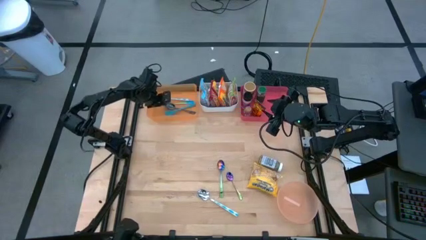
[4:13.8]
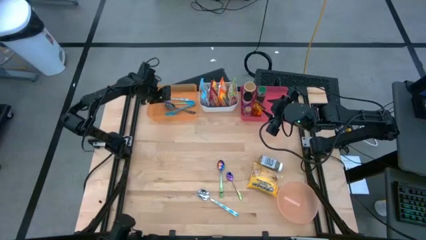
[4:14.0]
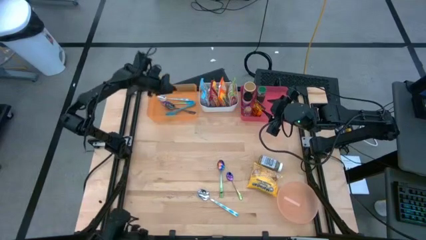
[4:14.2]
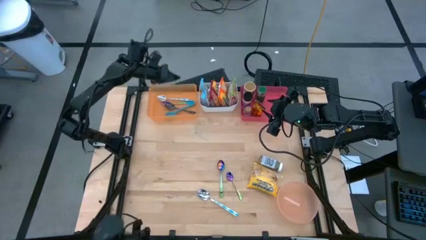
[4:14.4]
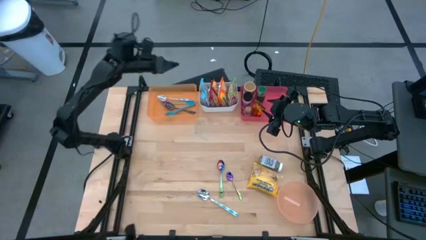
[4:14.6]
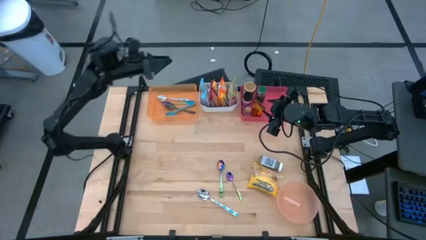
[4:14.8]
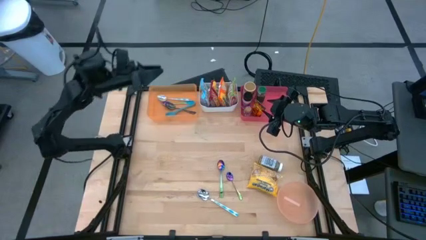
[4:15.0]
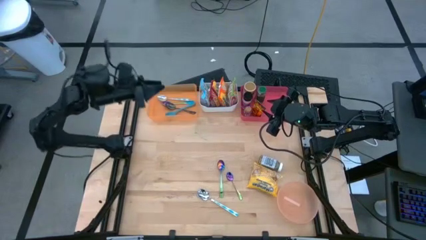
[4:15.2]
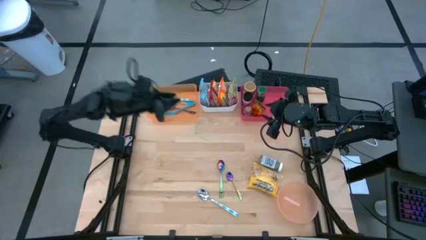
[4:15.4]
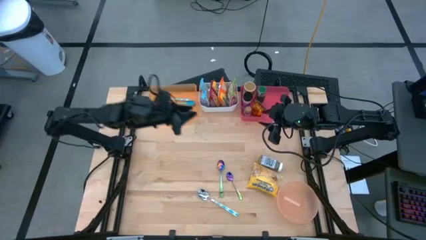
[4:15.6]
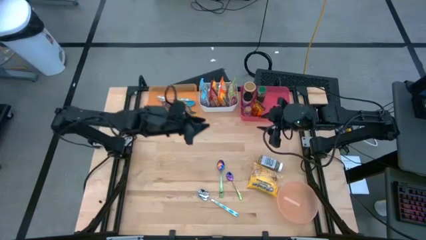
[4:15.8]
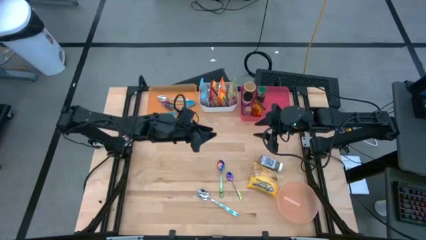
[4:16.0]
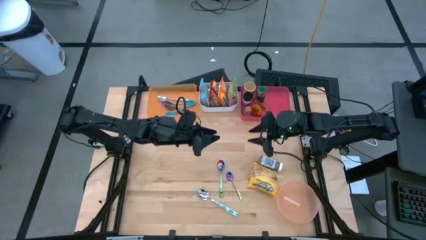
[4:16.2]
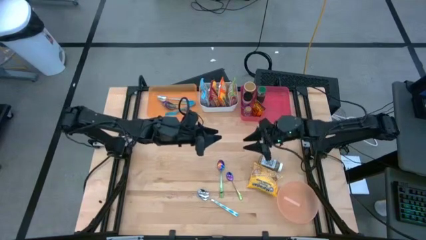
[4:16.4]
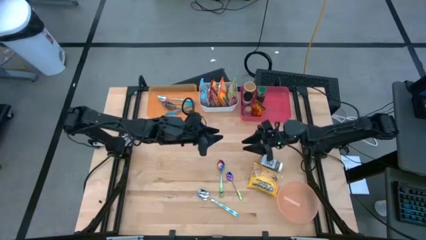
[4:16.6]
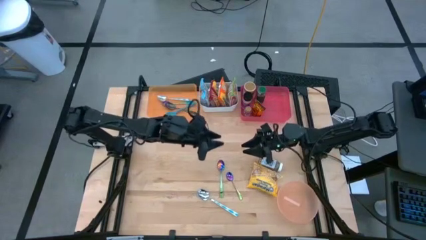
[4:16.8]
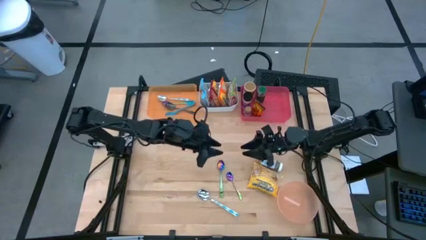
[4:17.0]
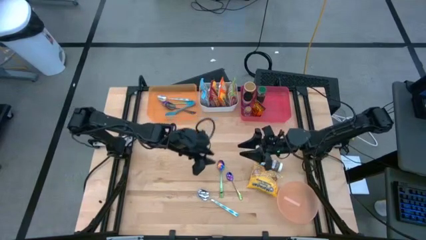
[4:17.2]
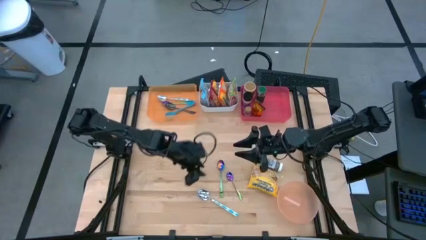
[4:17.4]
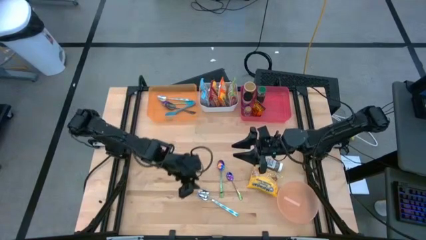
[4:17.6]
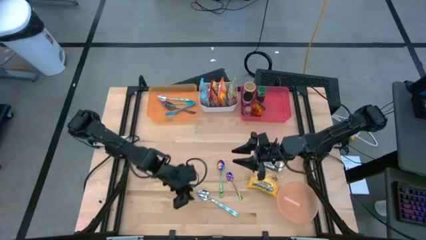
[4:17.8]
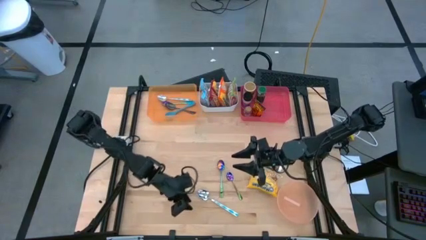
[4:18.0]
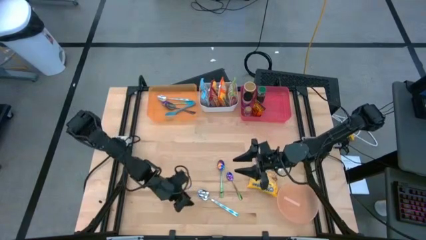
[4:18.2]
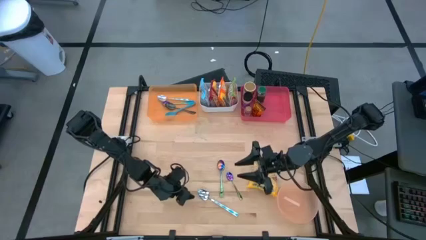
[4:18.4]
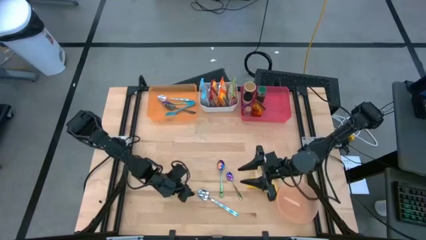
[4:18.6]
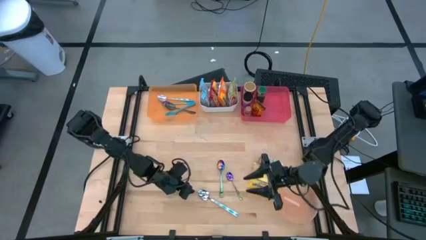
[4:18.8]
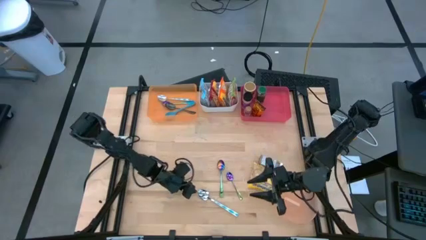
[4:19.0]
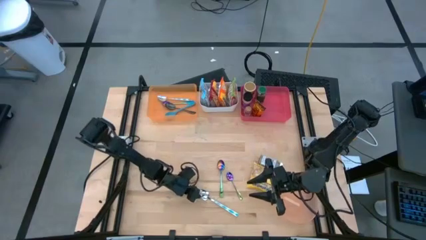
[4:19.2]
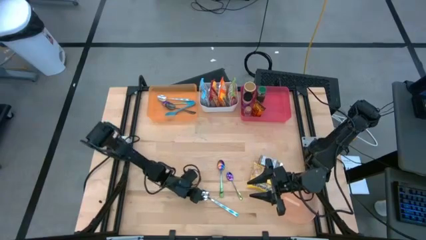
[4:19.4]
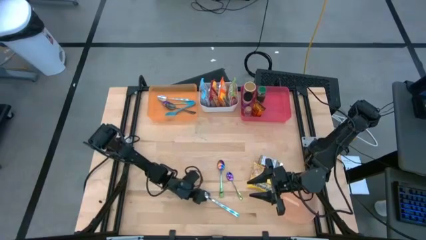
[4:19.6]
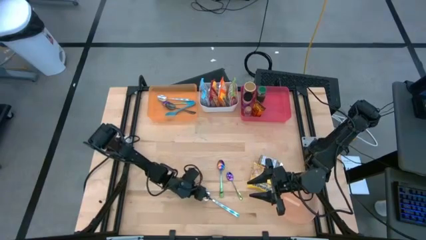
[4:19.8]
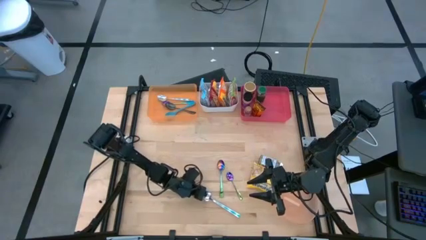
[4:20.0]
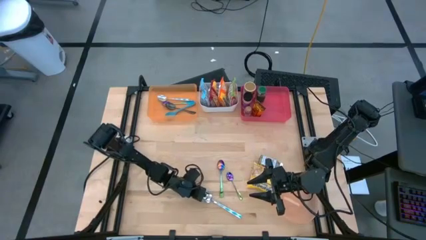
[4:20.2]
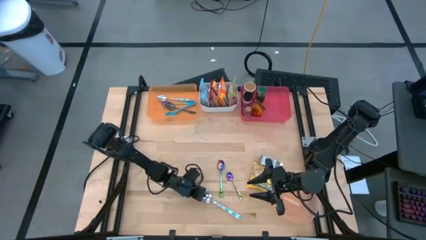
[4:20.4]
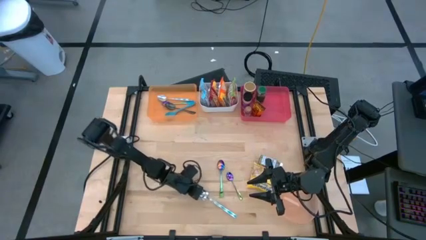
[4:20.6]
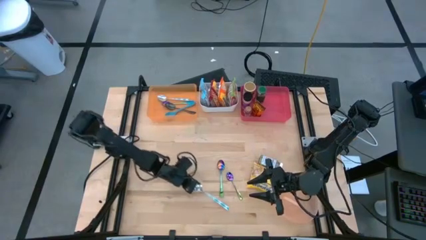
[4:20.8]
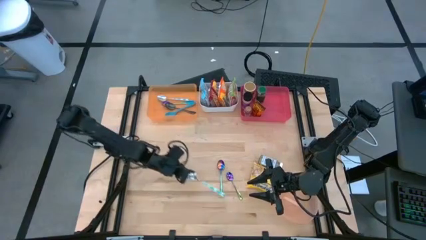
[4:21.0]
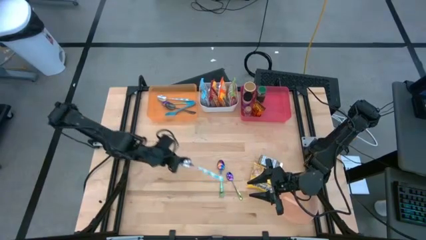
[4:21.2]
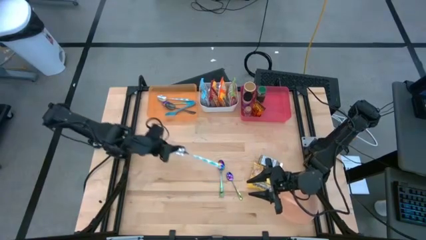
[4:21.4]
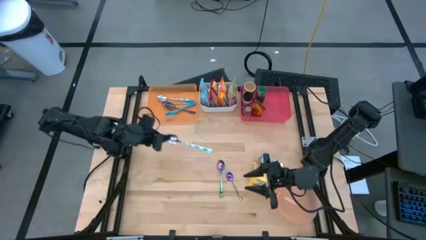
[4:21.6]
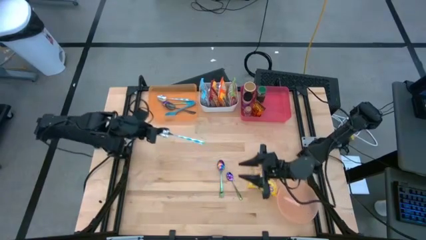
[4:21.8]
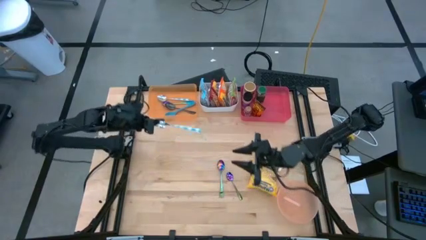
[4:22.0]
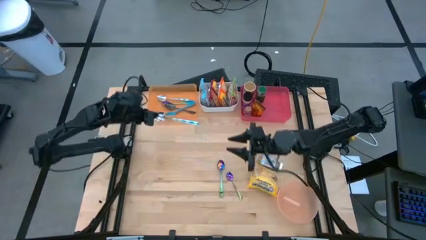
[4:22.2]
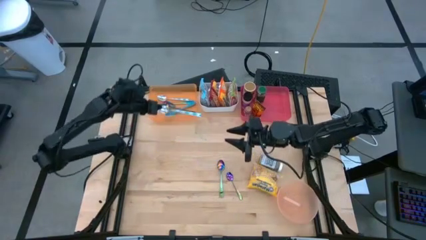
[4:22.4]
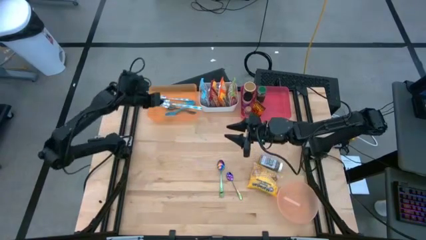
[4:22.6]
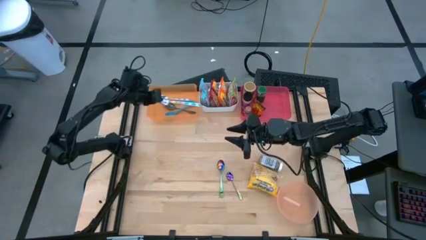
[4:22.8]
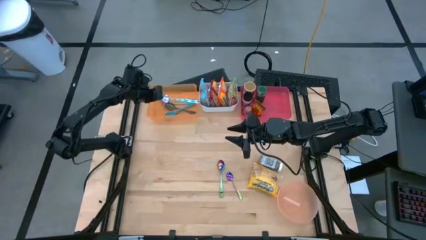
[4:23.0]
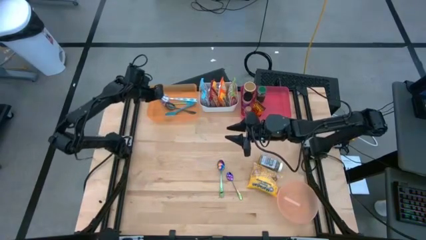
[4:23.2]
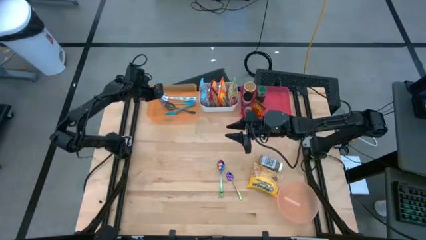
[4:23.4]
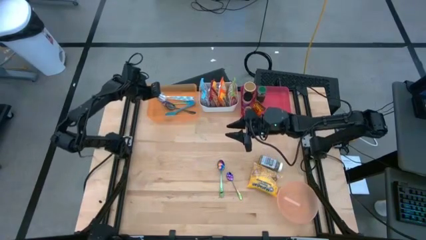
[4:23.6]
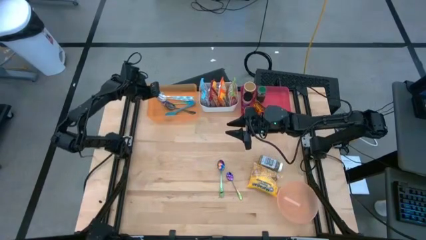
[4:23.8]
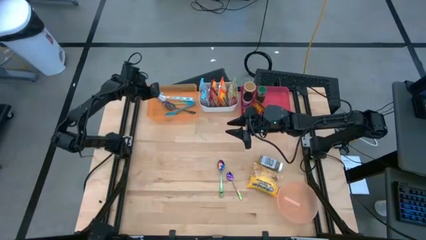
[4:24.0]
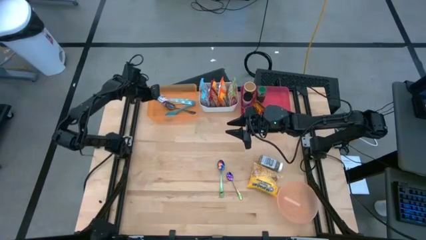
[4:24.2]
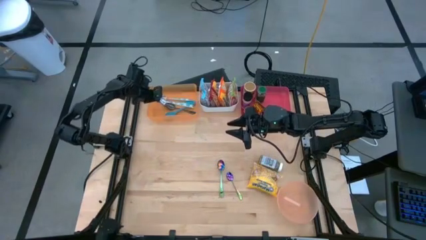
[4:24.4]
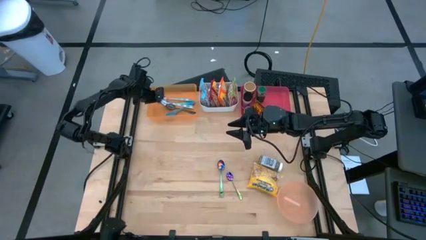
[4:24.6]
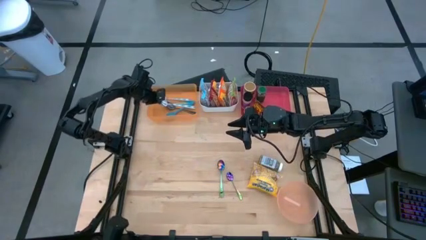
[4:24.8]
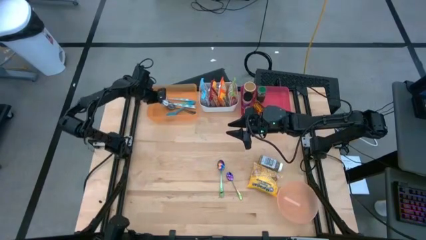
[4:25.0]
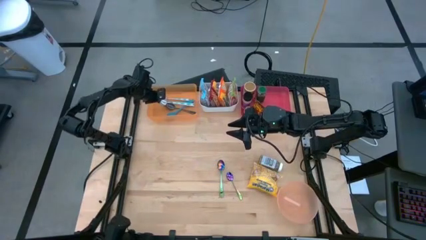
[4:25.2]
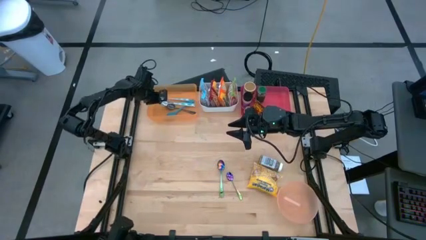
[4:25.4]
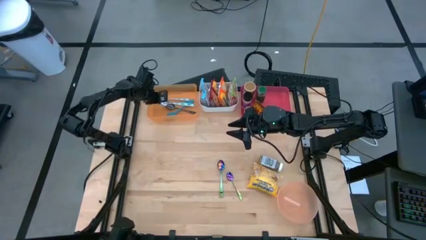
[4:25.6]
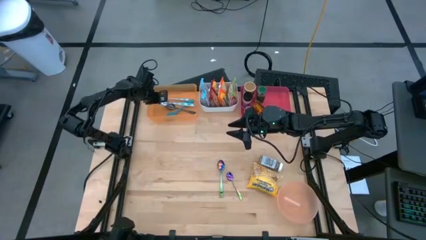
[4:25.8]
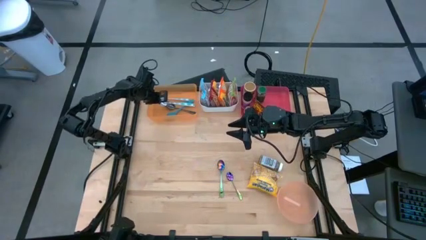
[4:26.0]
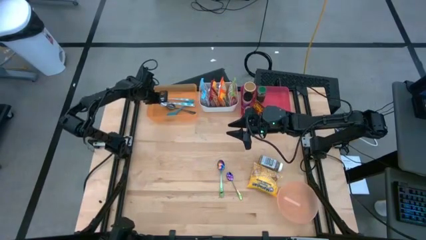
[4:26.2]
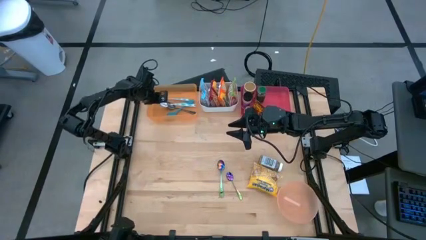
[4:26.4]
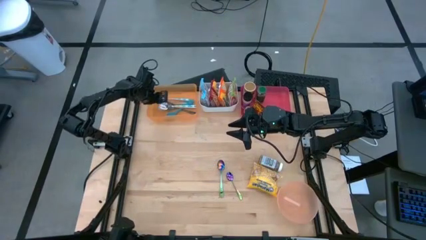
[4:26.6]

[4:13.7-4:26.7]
Task: Pick & Place Food Item
Put the blue spoon into the orange bin
